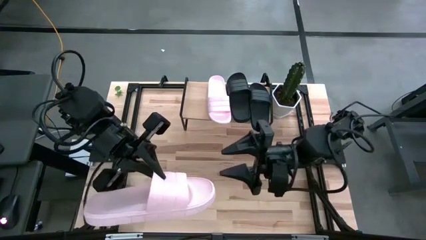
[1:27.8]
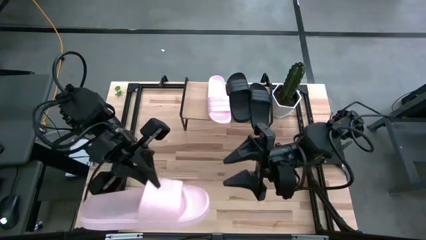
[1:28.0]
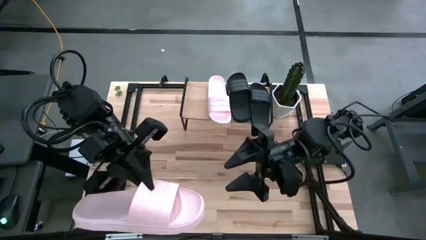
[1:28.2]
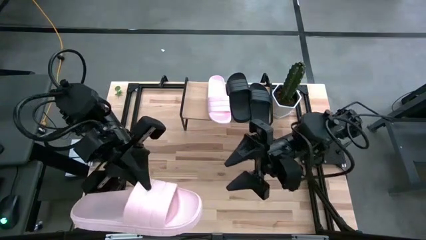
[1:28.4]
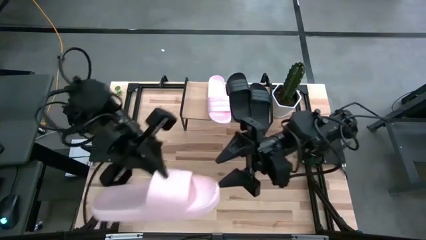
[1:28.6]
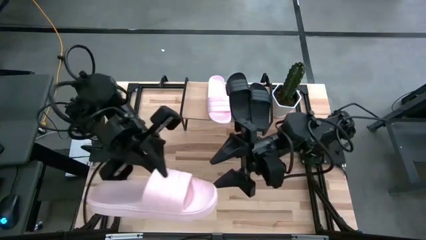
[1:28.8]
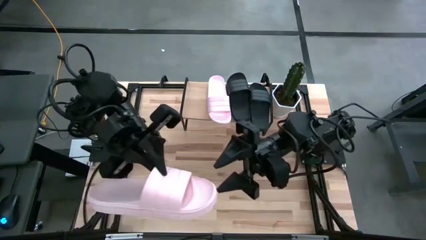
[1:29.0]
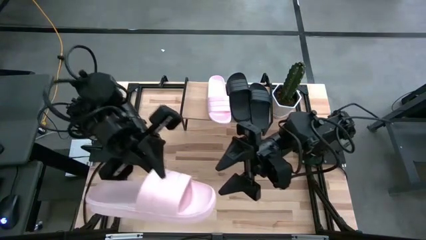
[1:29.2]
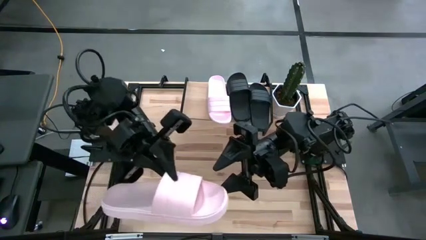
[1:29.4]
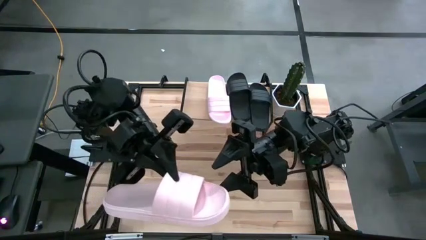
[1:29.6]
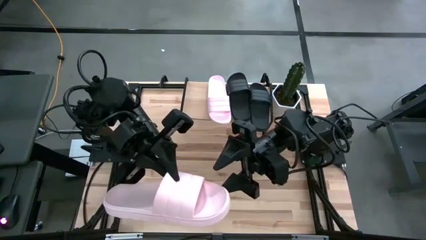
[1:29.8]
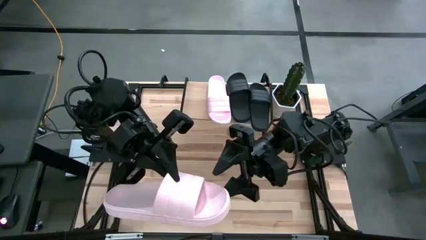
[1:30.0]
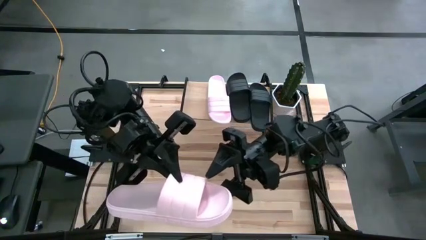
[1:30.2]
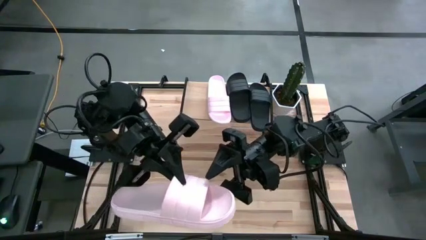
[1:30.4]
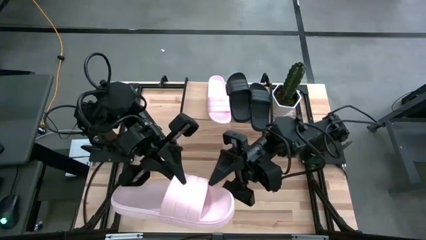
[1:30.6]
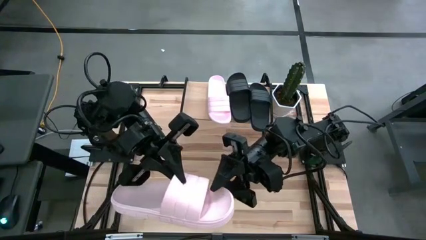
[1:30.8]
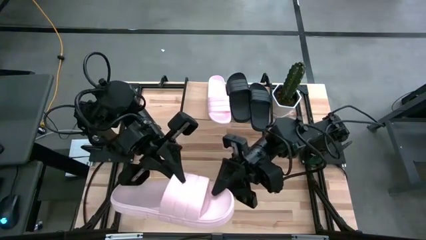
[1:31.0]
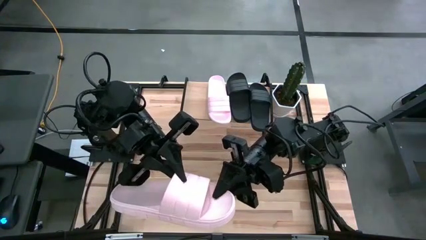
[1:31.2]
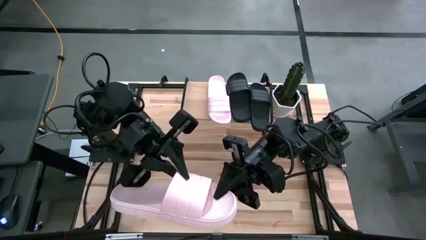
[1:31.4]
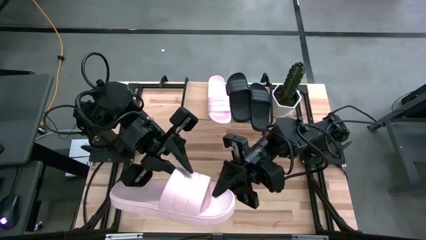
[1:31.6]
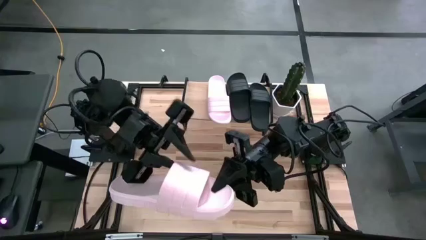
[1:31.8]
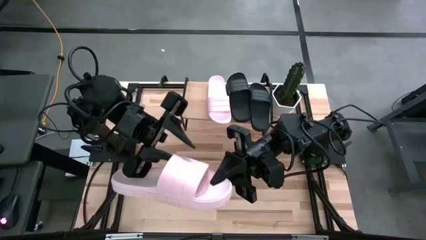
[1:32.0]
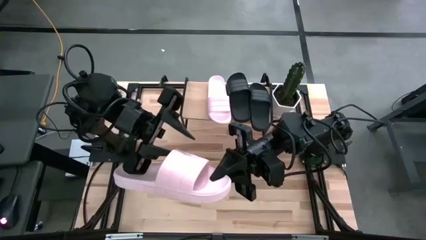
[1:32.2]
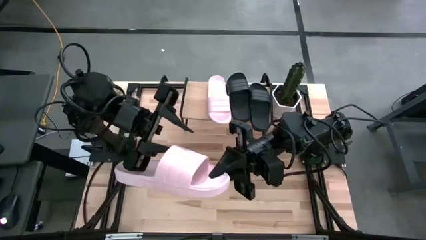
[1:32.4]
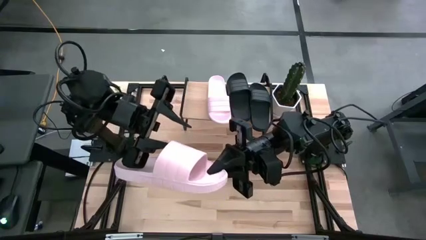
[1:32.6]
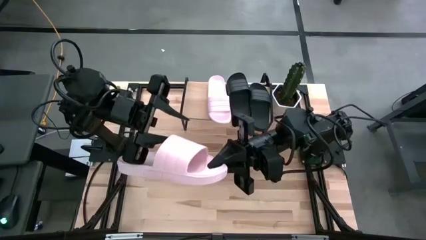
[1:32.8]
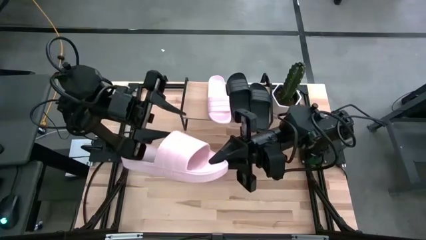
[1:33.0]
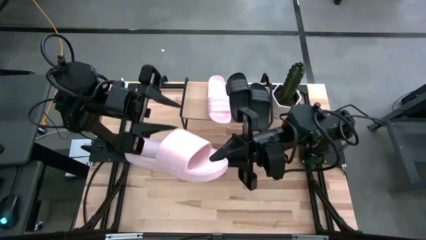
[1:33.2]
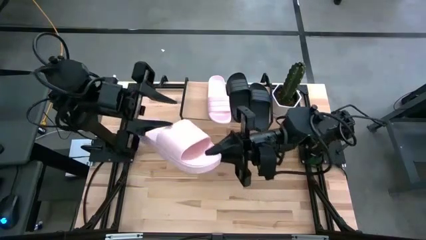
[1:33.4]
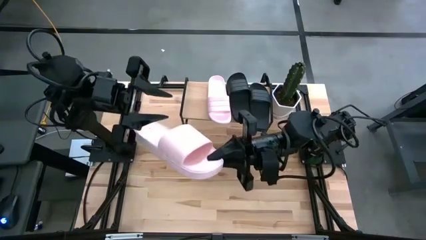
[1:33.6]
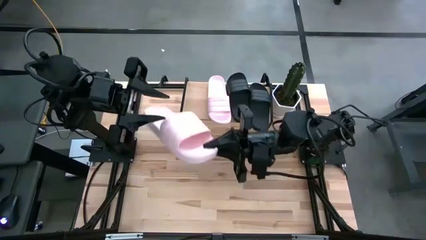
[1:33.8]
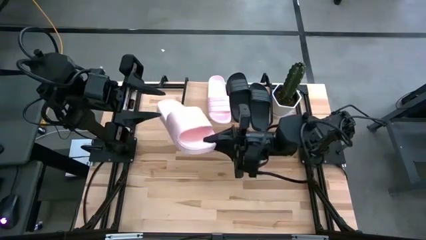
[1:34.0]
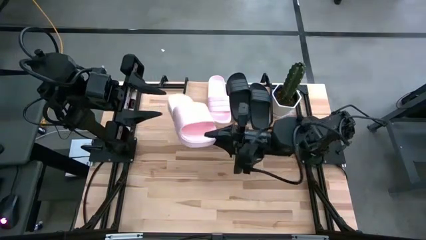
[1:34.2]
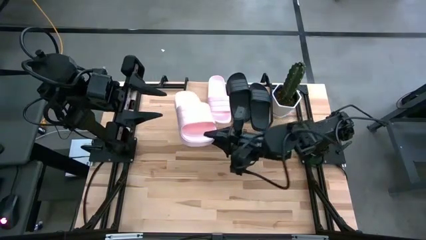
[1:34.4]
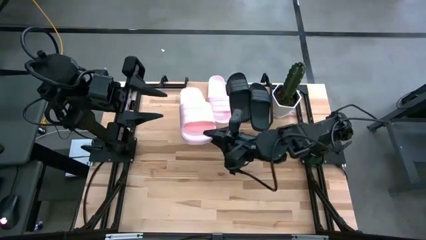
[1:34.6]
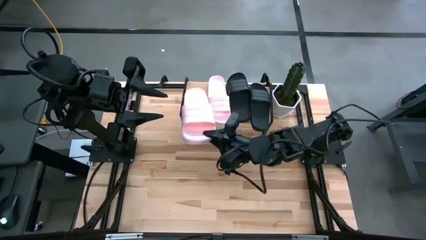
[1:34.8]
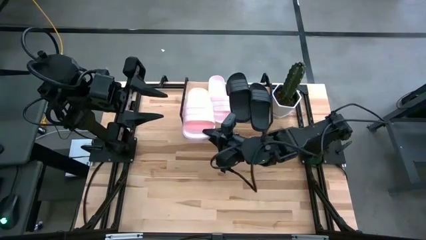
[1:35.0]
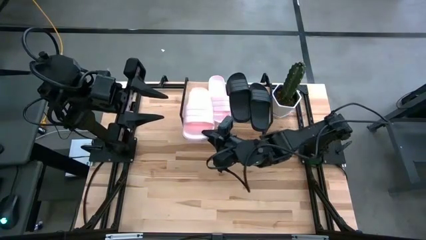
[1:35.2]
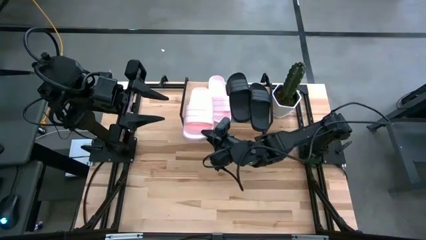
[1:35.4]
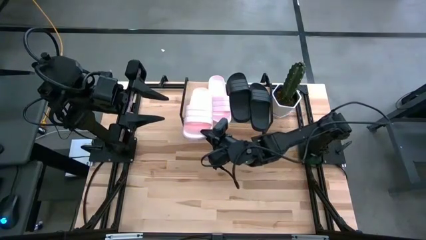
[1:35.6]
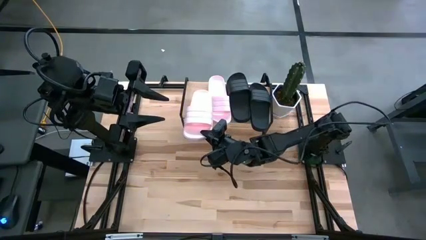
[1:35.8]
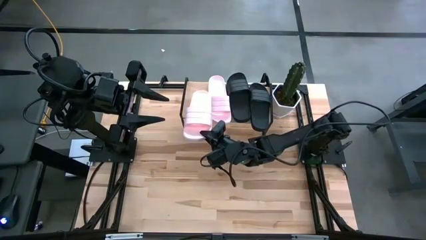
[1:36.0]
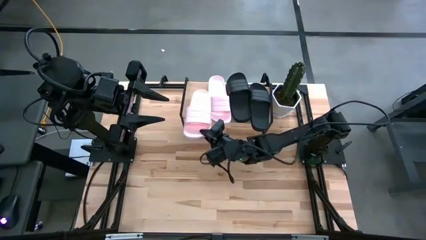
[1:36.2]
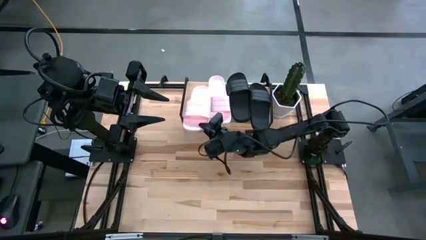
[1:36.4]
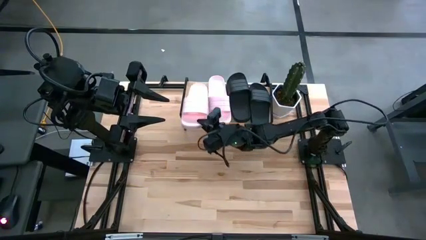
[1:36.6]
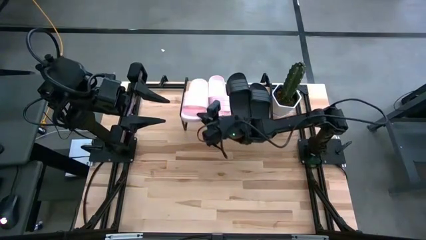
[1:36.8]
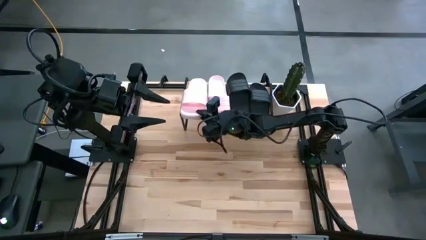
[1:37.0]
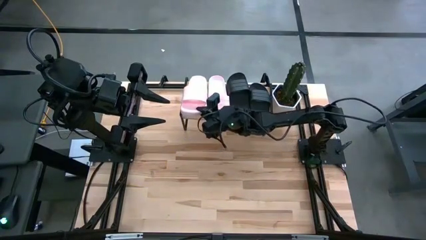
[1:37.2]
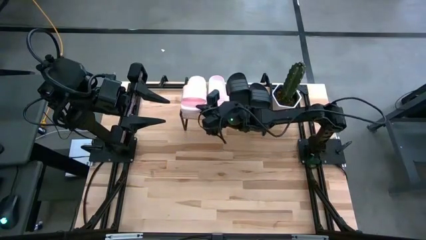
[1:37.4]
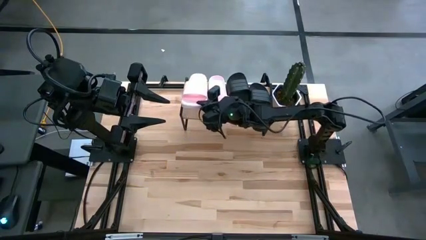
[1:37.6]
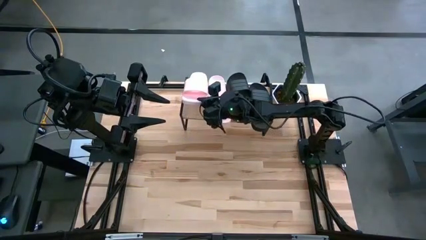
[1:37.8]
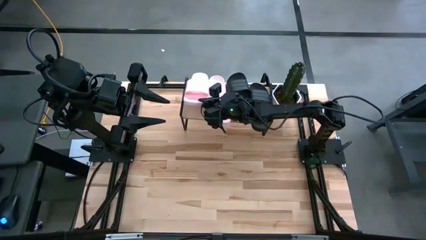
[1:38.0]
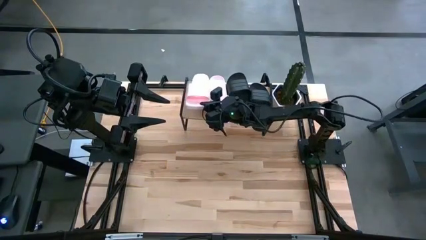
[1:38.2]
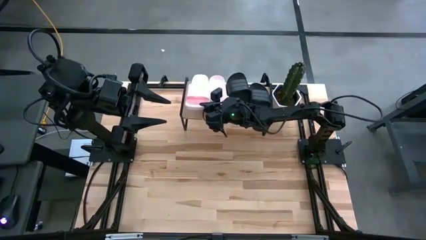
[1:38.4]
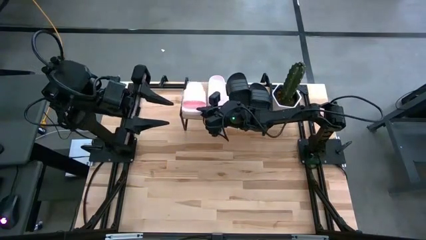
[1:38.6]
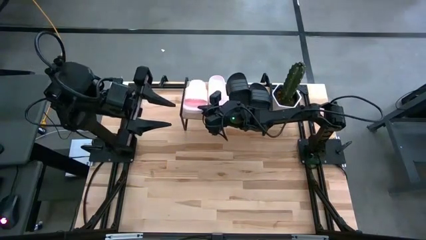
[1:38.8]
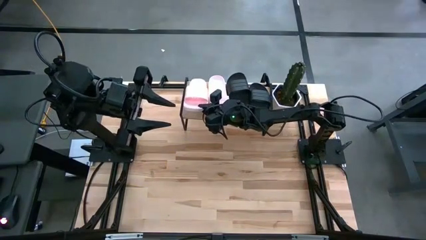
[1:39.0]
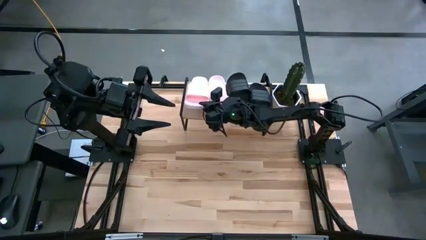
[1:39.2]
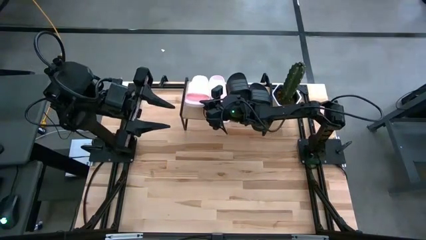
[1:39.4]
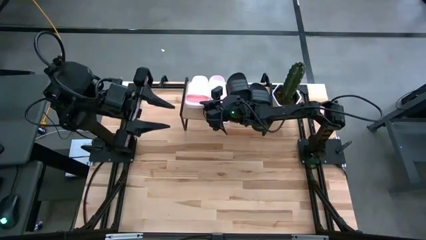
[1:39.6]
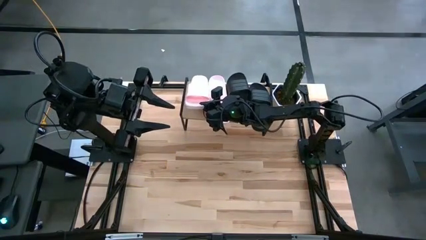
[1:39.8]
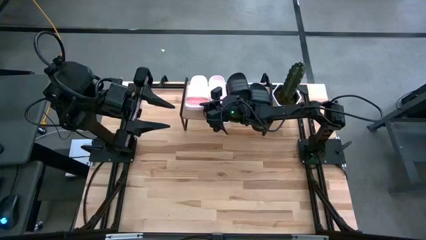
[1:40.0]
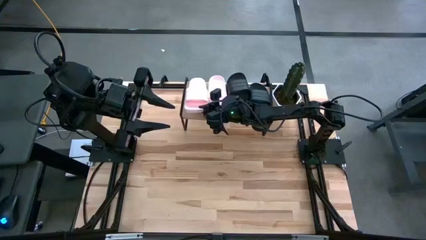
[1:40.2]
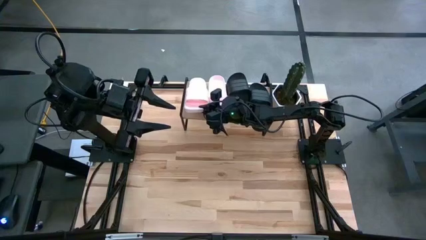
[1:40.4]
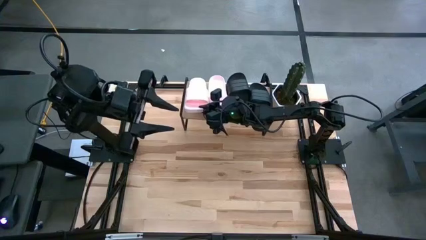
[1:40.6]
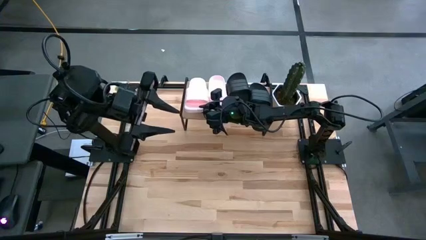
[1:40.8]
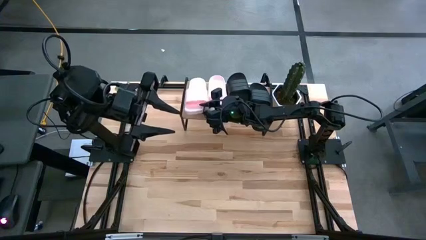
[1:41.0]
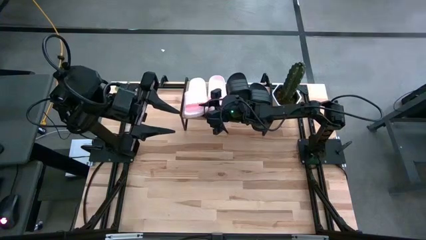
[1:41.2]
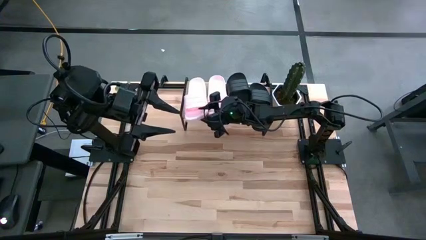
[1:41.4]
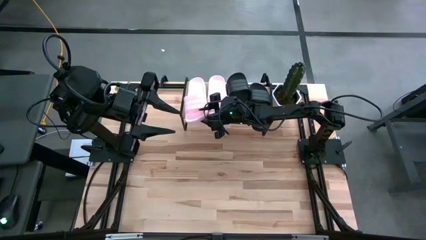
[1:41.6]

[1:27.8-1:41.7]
Task: Pick and place slides into the shelf
Put the pink slide on the shelf

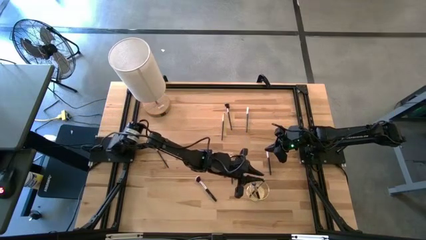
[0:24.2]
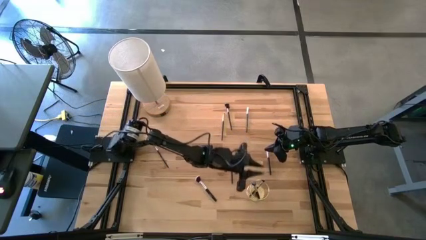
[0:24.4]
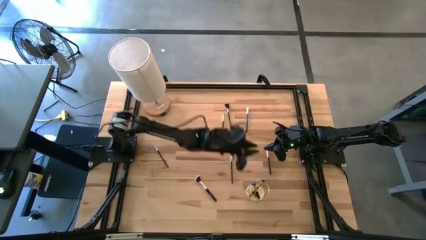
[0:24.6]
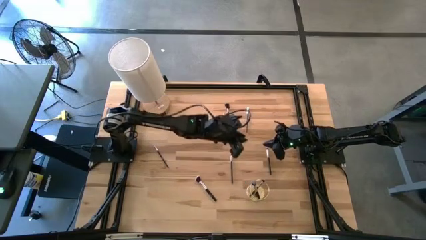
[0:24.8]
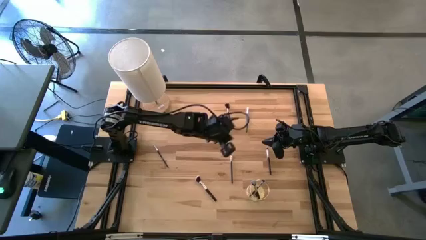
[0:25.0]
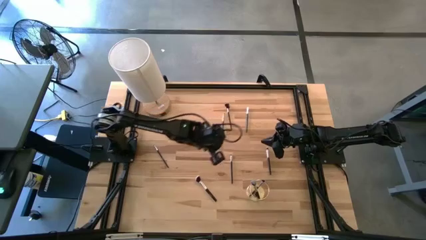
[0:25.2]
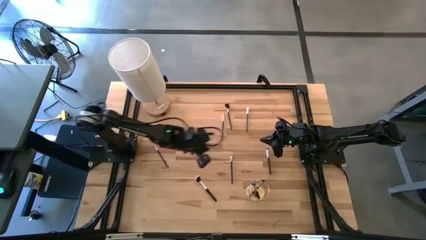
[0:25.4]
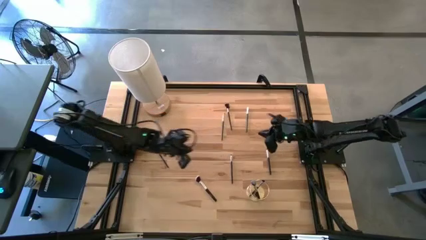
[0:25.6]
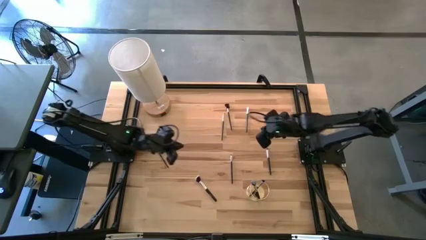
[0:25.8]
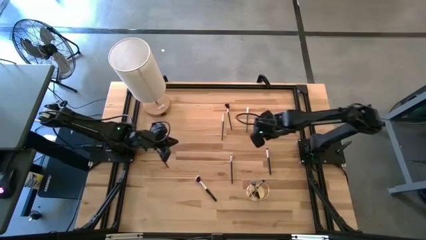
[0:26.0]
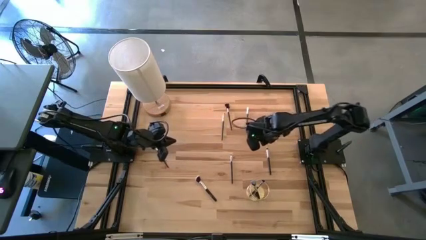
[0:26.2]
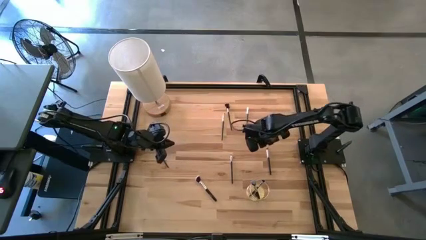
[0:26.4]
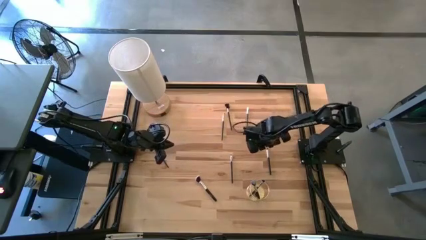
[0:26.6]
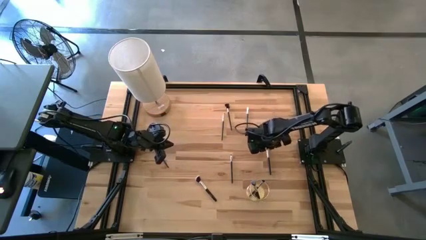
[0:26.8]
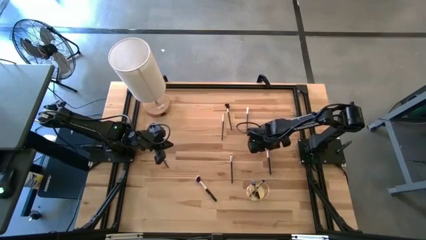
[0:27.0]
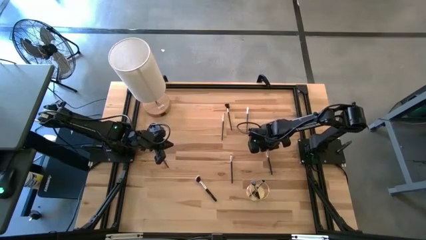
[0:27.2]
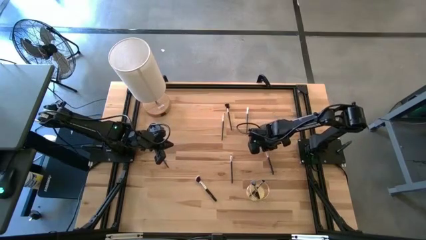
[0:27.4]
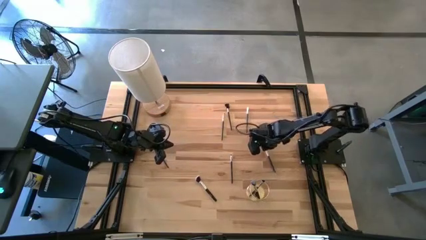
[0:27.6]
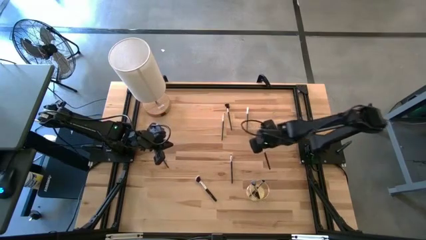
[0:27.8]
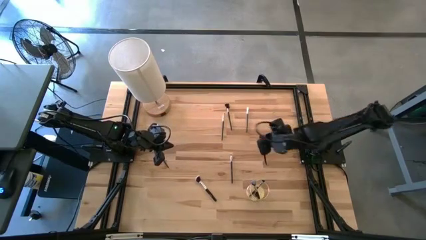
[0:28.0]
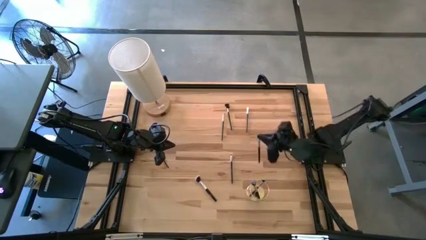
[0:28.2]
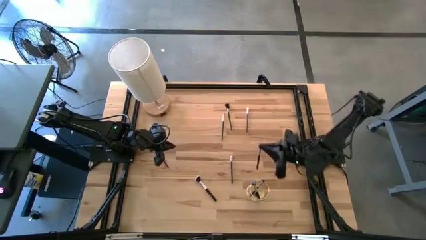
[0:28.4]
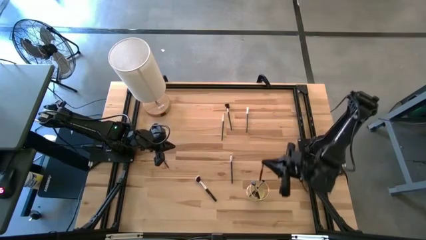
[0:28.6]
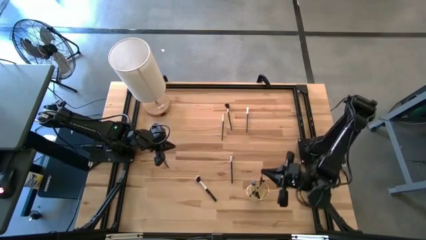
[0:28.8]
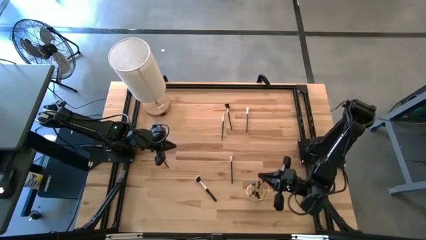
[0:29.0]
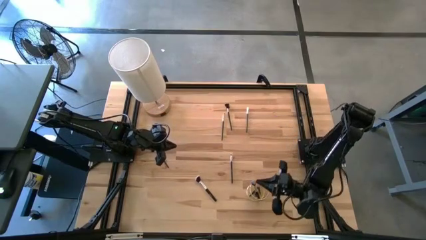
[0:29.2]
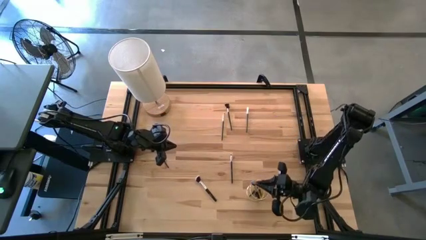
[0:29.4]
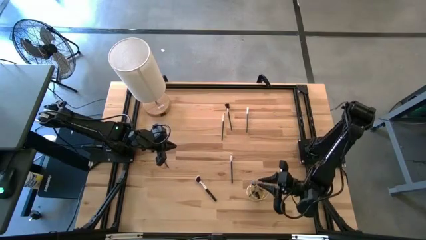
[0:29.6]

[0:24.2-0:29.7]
Task: Pick & Place Makeup Brushes
Put the eyeshadow brush into the makeup holder
